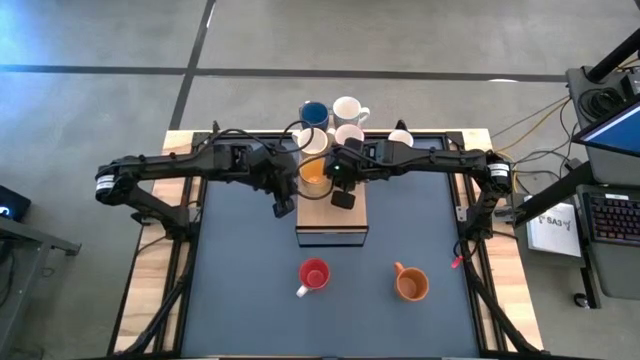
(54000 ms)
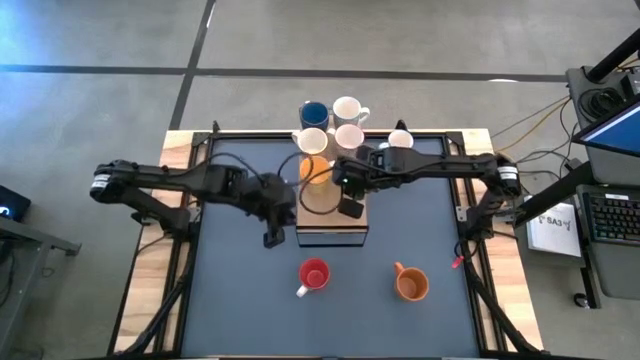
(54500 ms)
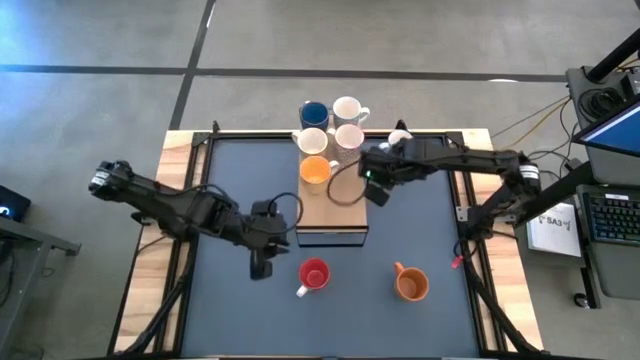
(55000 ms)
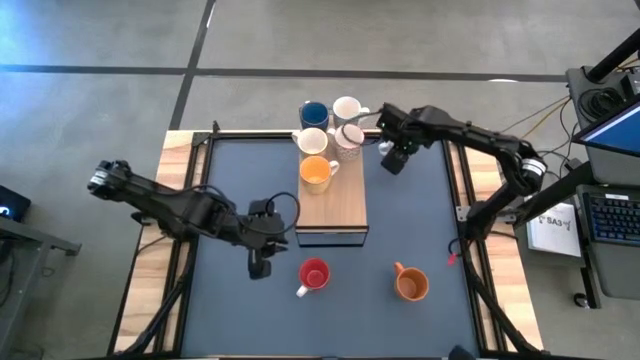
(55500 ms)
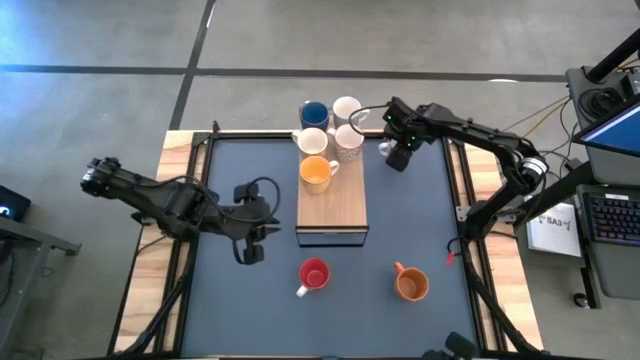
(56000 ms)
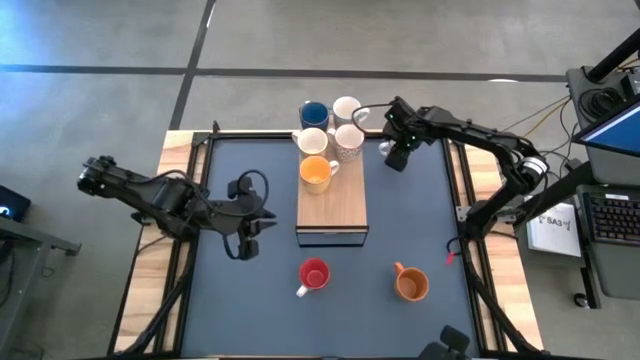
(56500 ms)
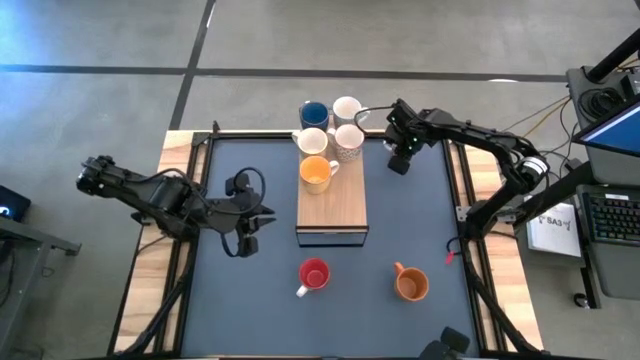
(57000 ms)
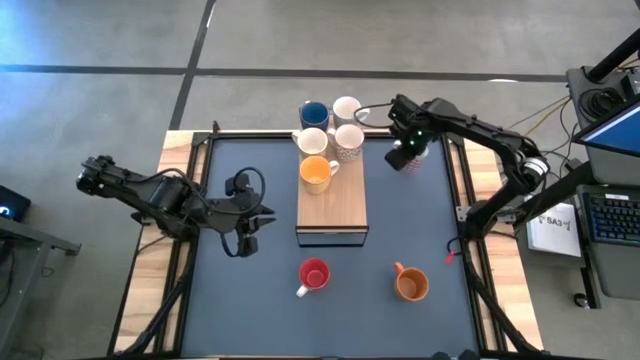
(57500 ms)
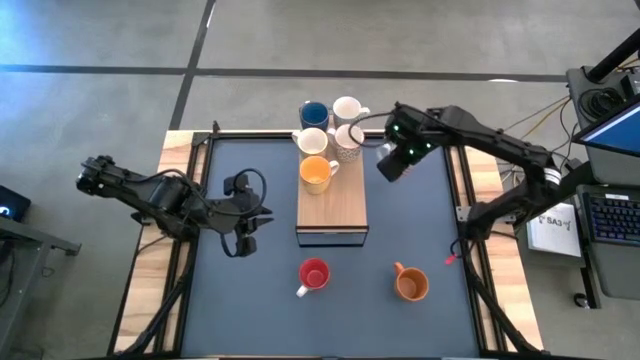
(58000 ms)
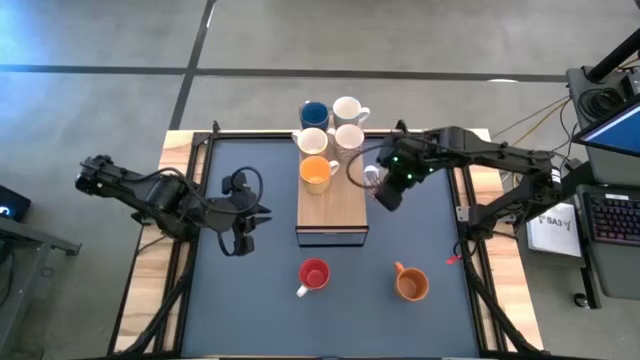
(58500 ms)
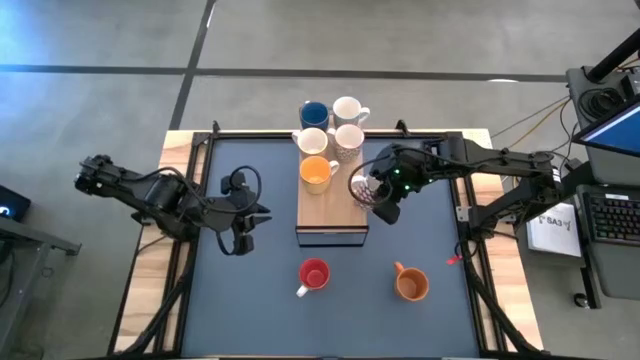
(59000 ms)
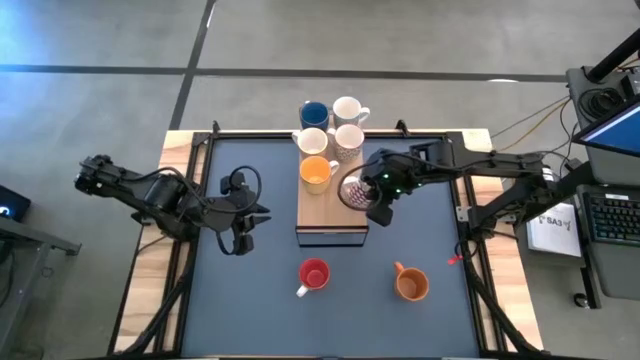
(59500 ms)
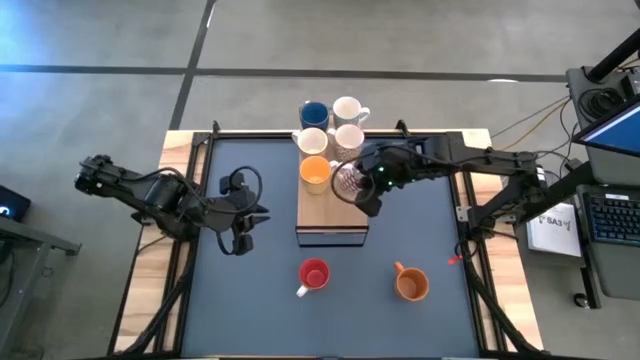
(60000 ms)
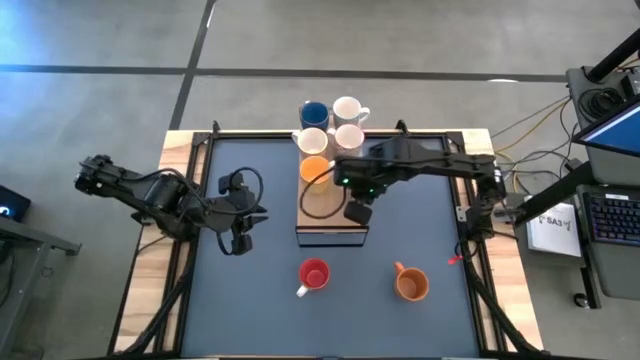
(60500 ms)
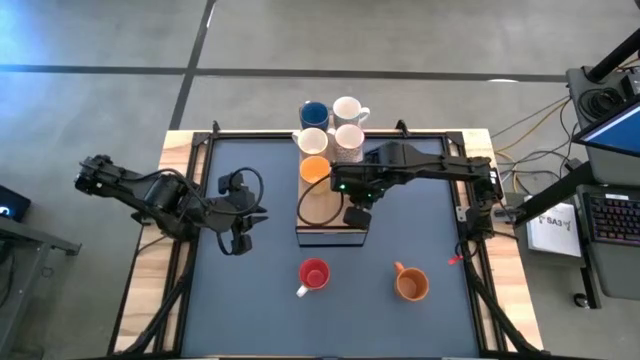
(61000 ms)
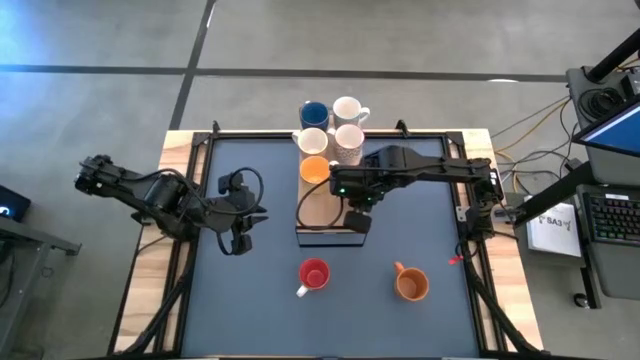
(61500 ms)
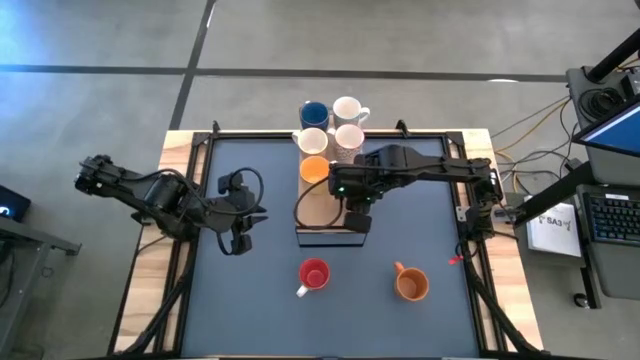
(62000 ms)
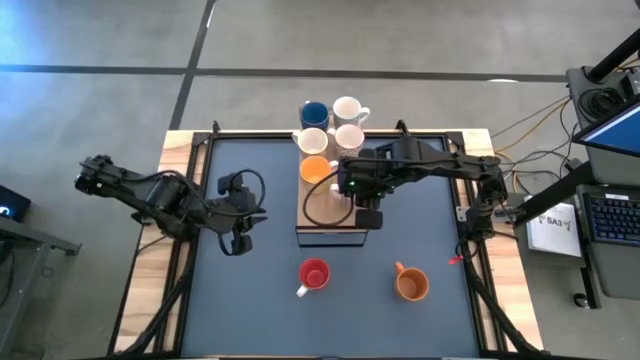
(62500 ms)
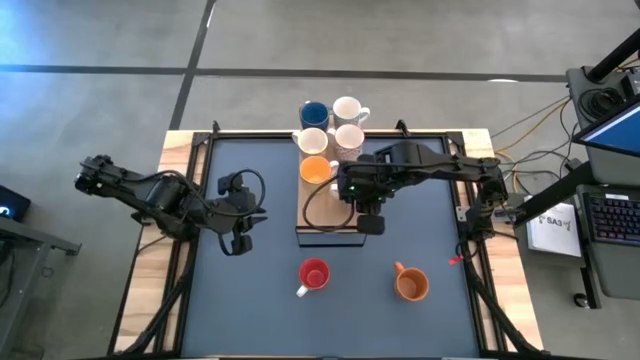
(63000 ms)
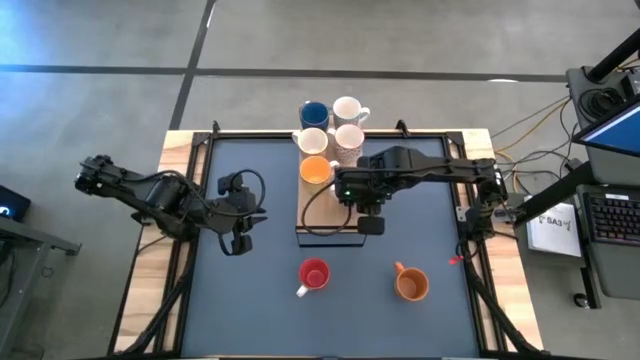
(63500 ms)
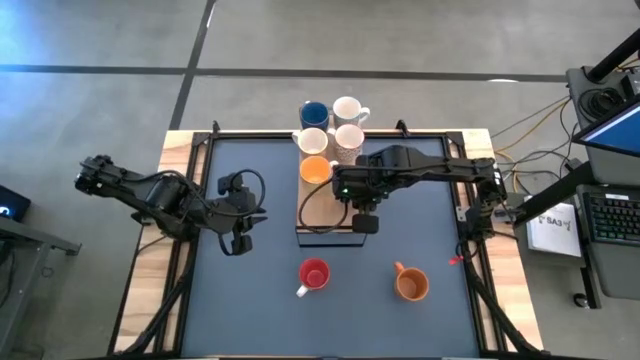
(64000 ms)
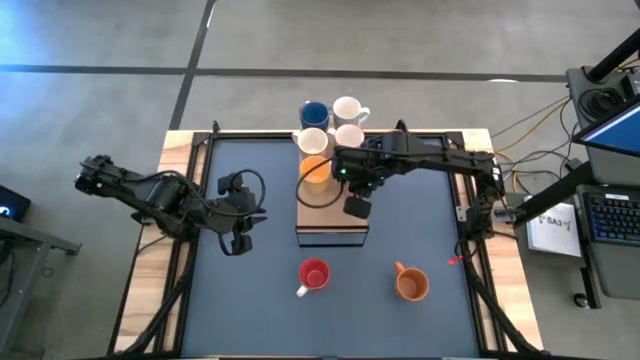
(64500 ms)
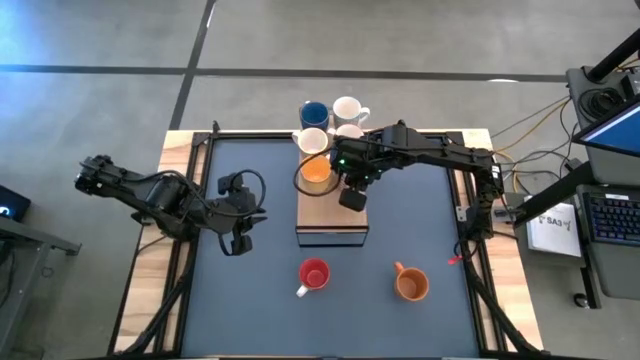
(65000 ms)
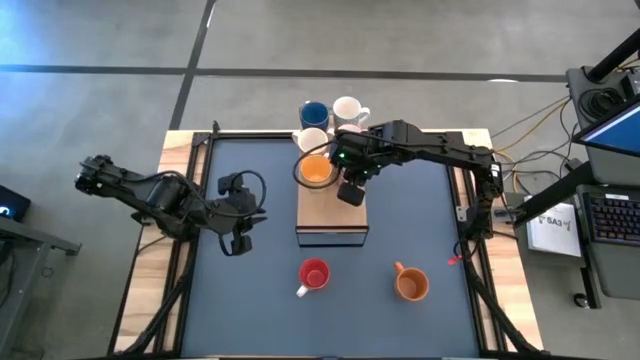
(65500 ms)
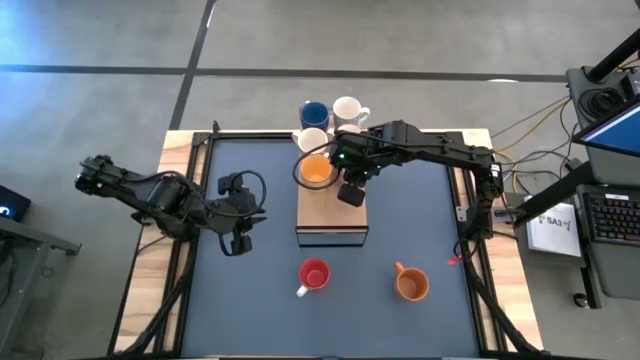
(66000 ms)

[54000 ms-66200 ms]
Task: Place coffee mugs
Put the red patterned mug on the shelf

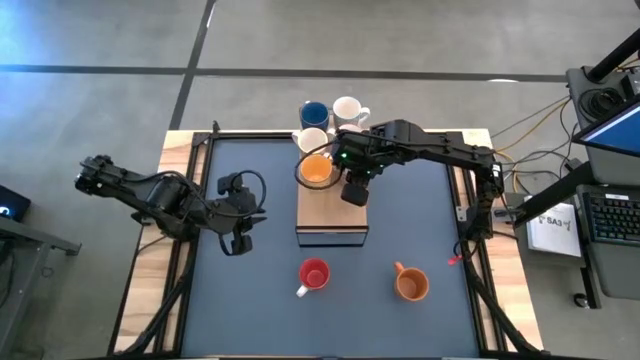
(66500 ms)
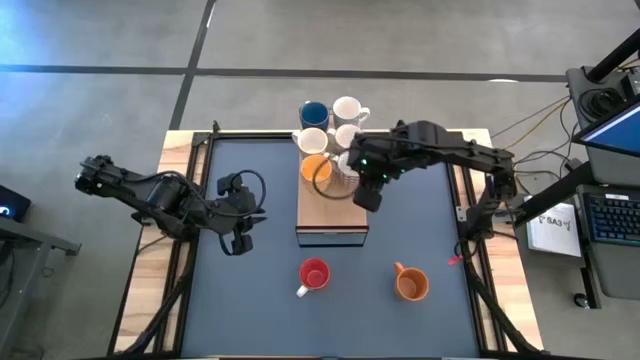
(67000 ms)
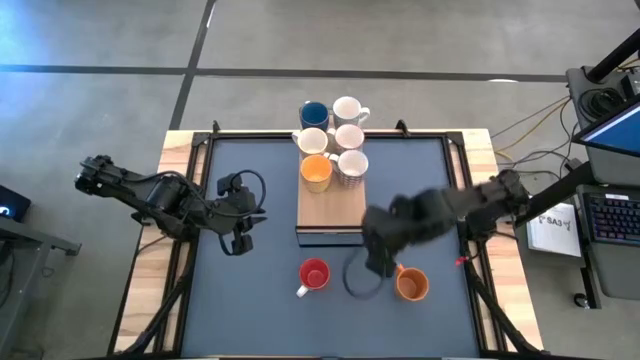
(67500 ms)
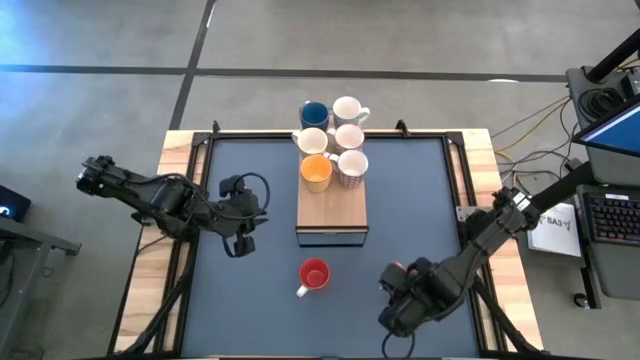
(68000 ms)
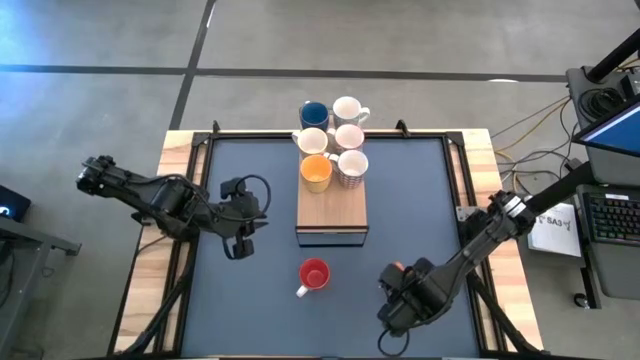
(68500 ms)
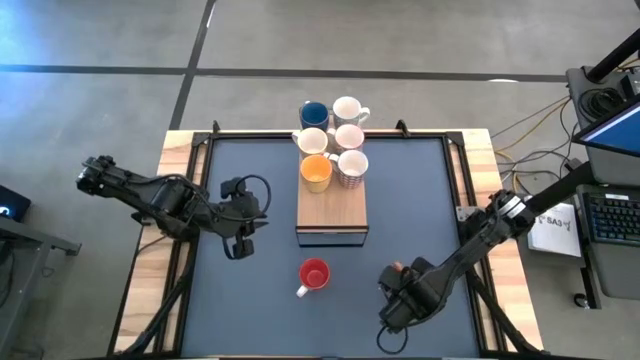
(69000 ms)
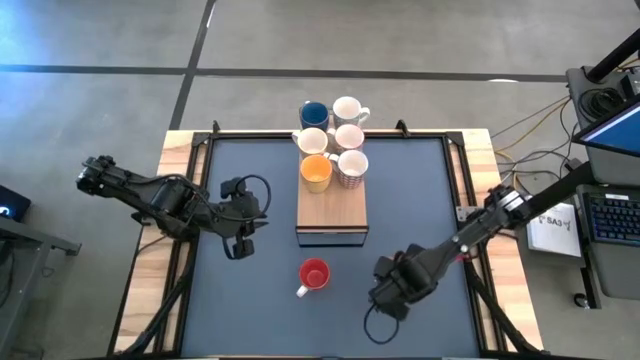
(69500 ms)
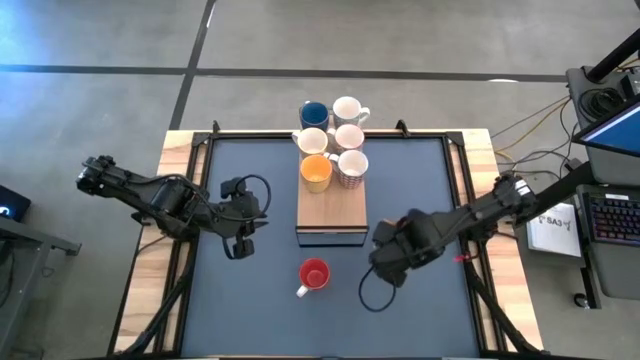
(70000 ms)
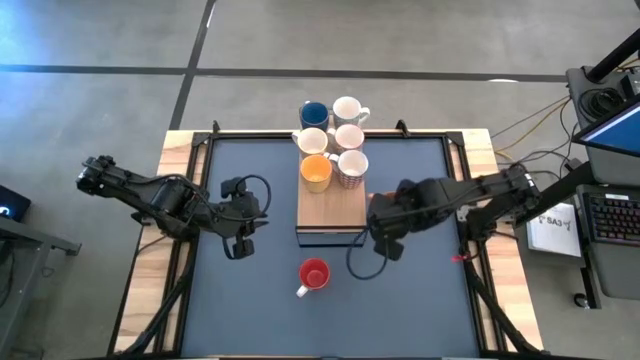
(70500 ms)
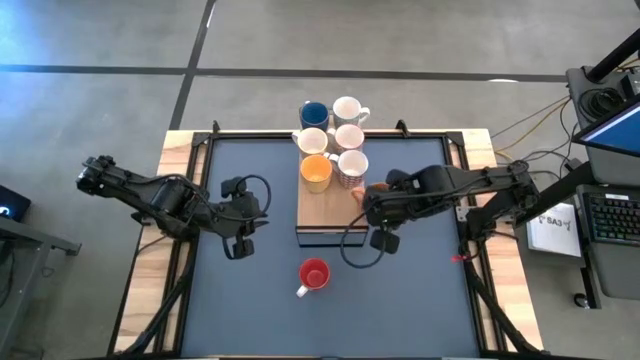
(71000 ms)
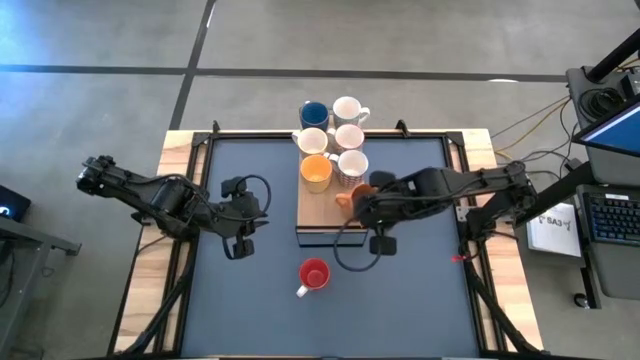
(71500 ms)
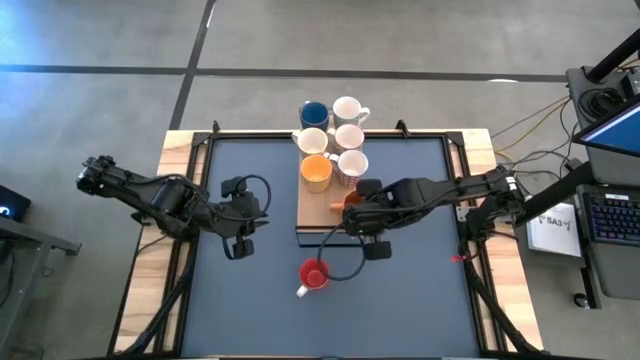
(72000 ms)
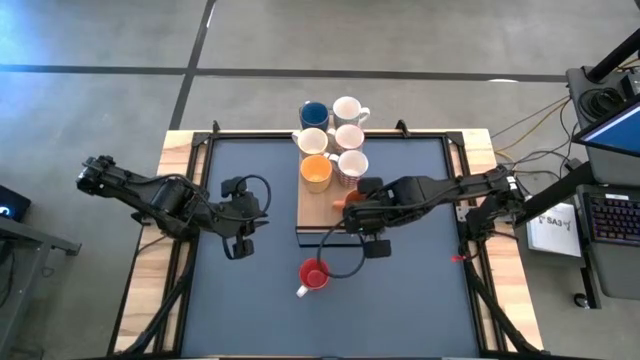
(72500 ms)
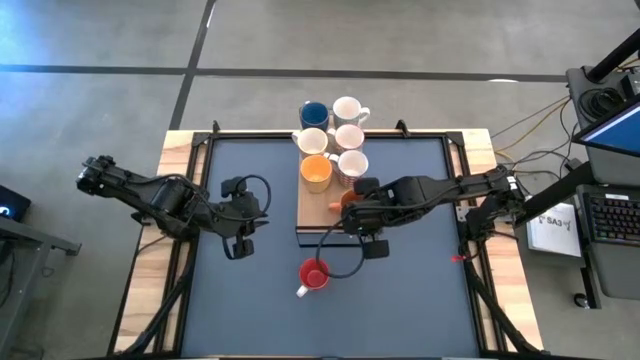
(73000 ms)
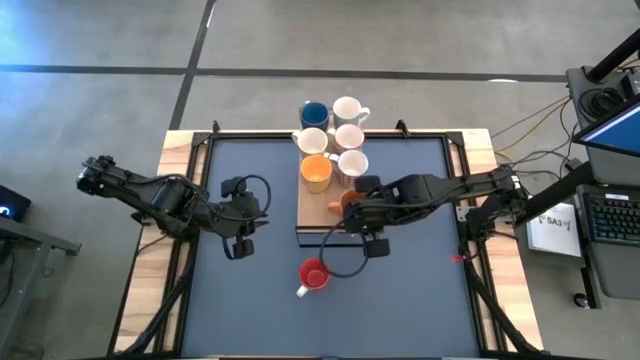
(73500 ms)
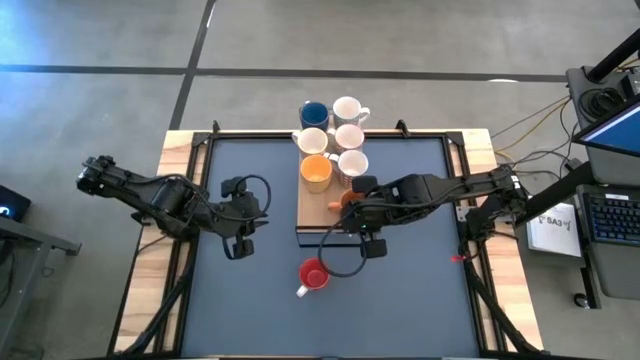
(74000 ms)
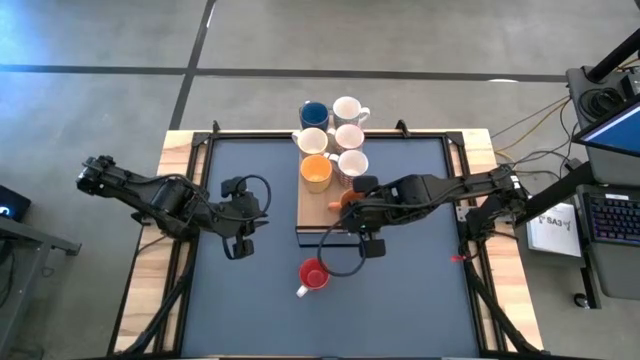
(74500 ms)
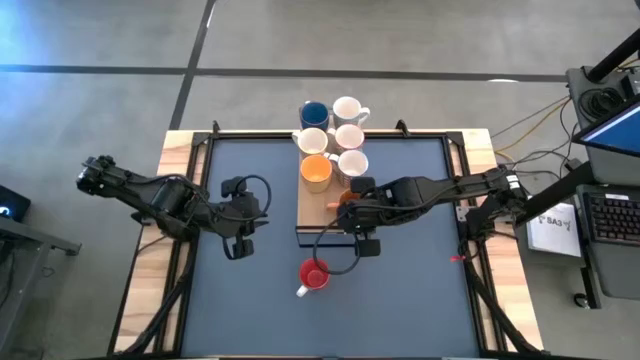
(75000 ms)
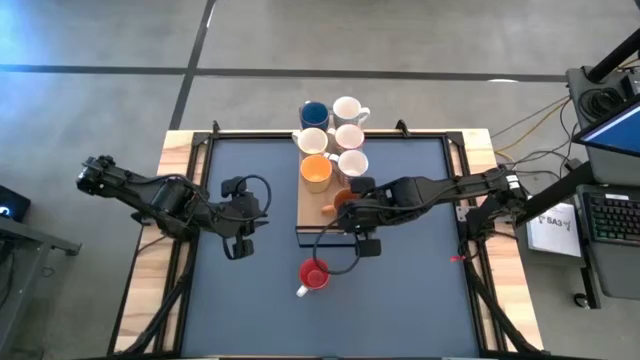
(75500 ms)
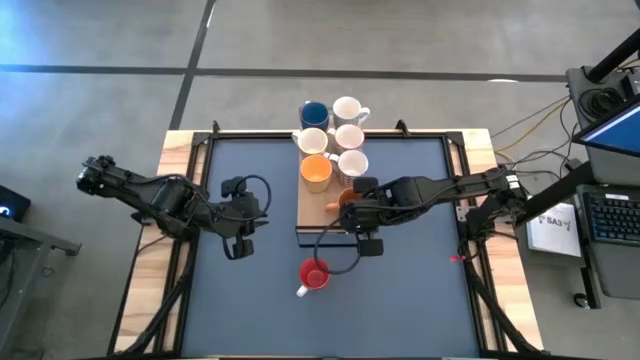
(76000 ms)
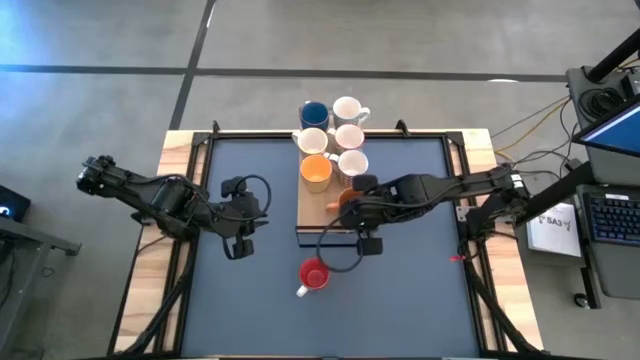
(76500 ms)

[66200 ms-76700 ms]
Put the orange mug on the shelf
